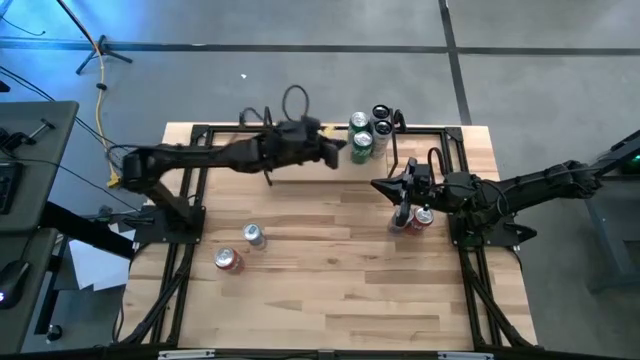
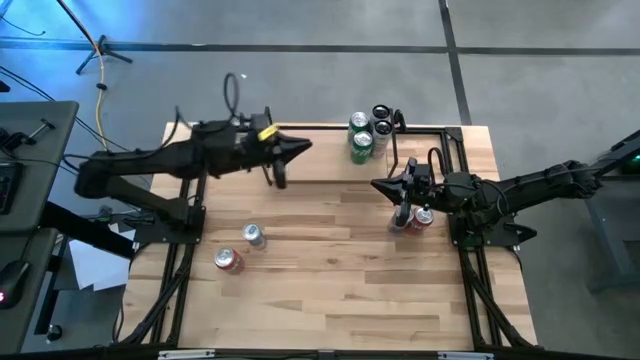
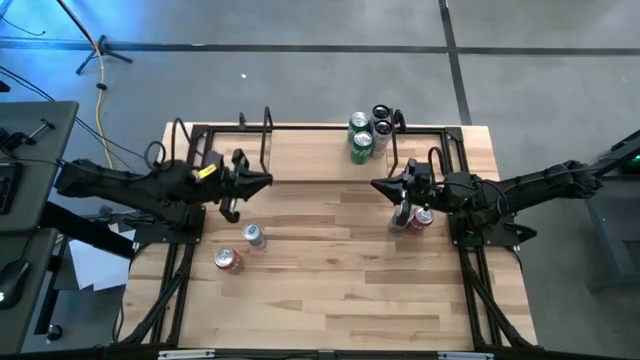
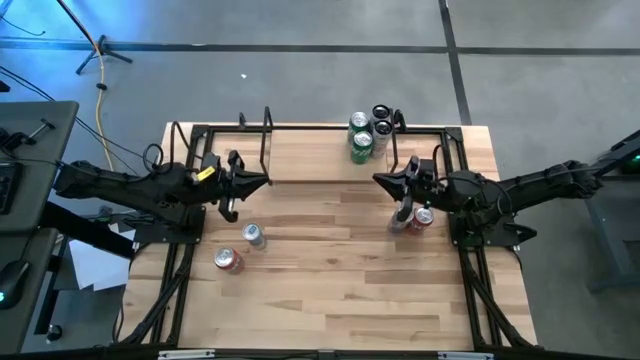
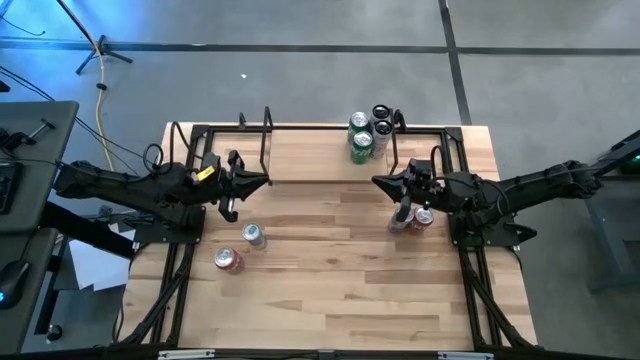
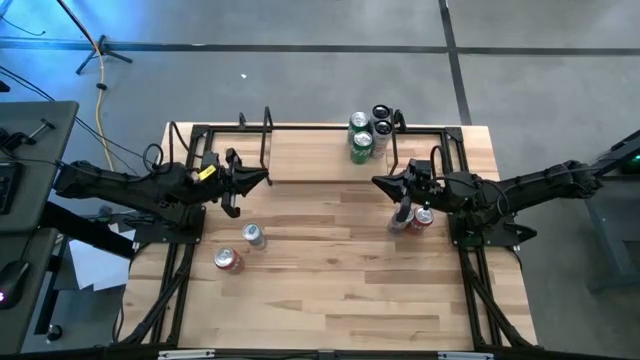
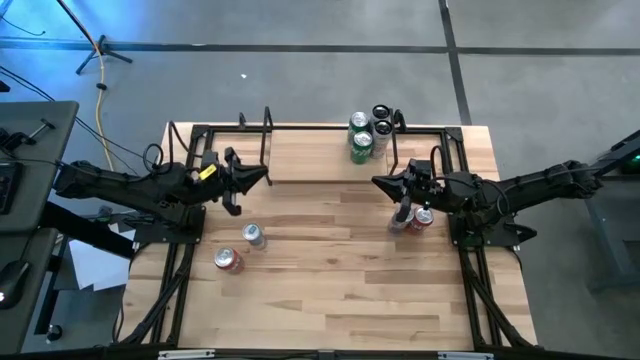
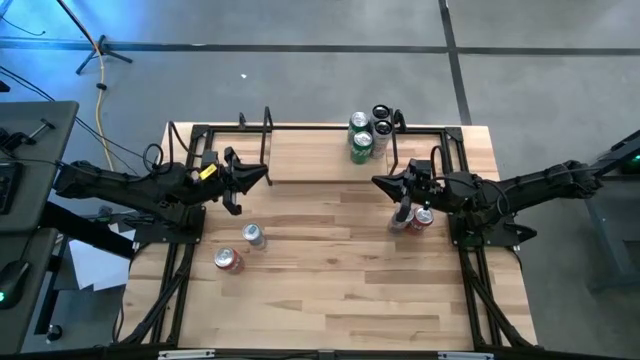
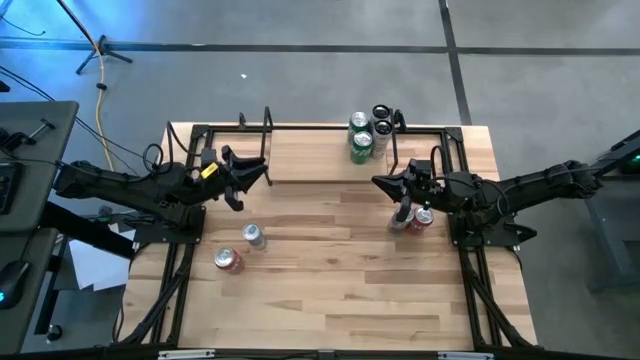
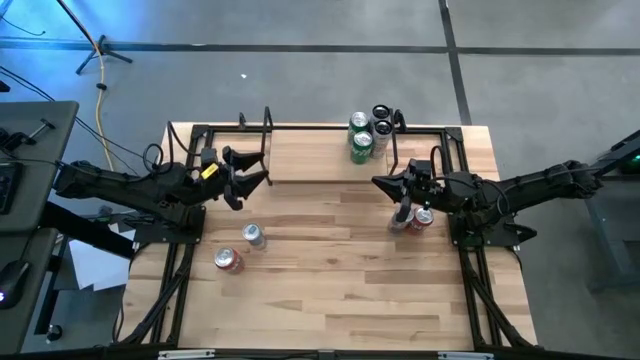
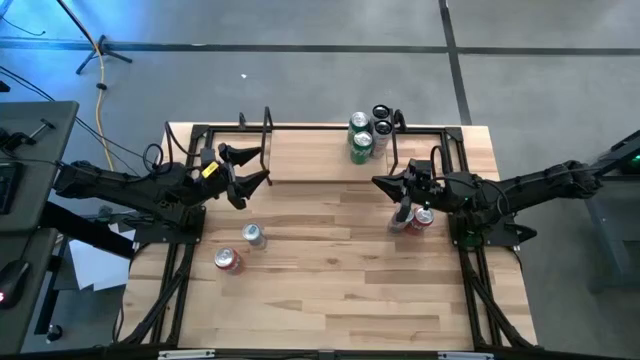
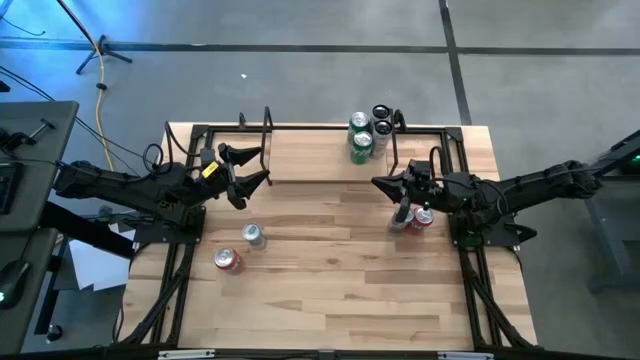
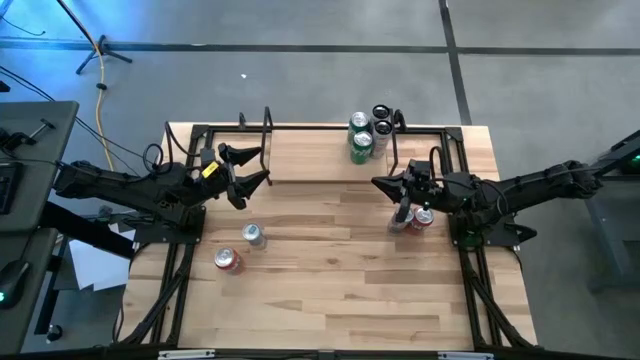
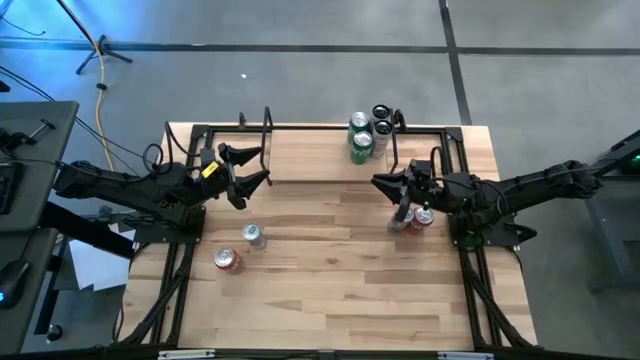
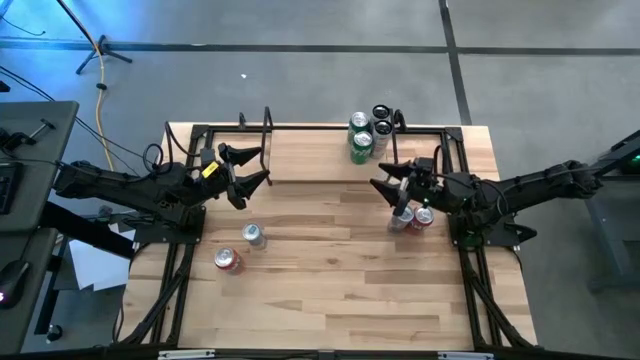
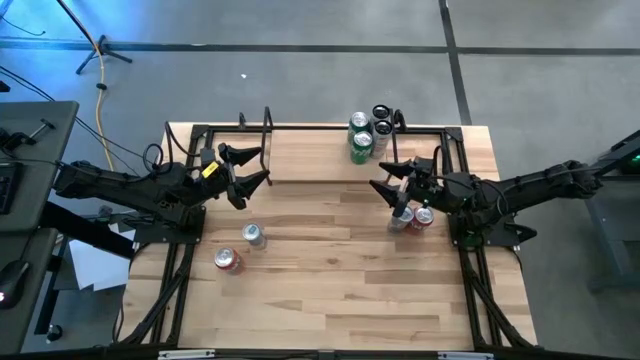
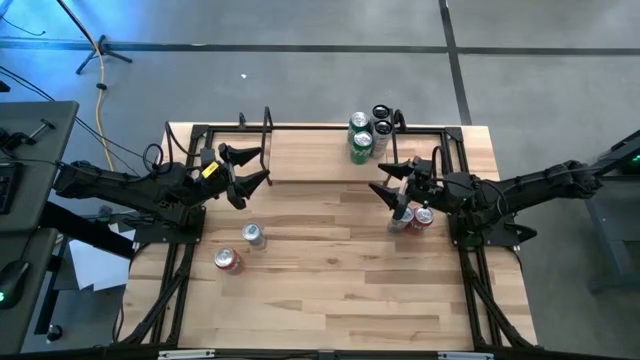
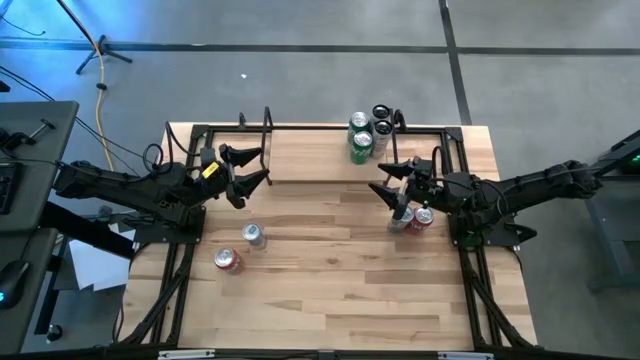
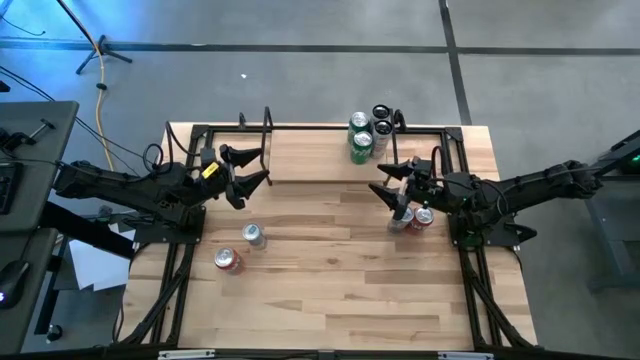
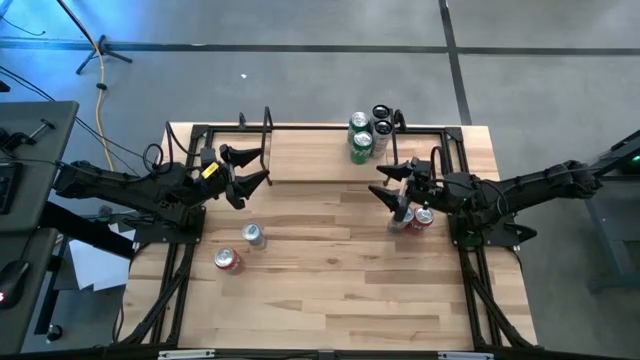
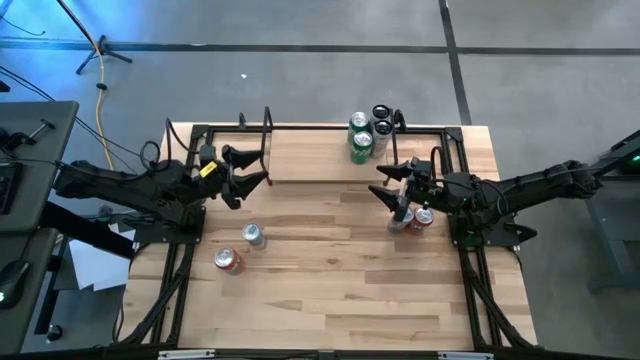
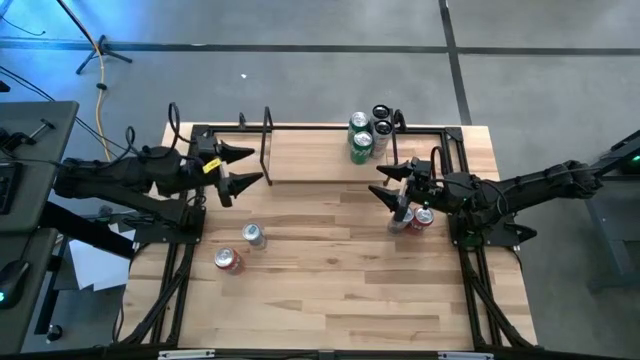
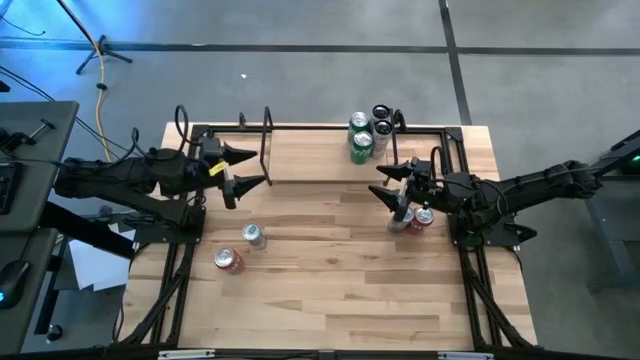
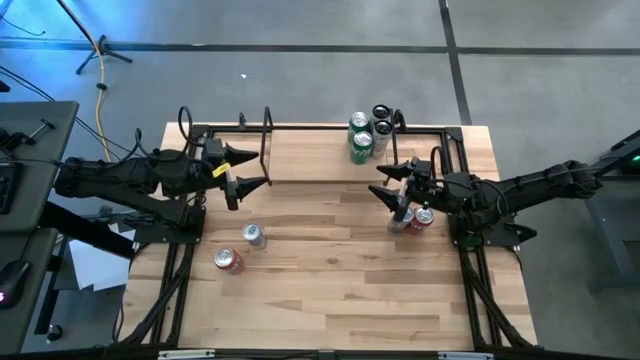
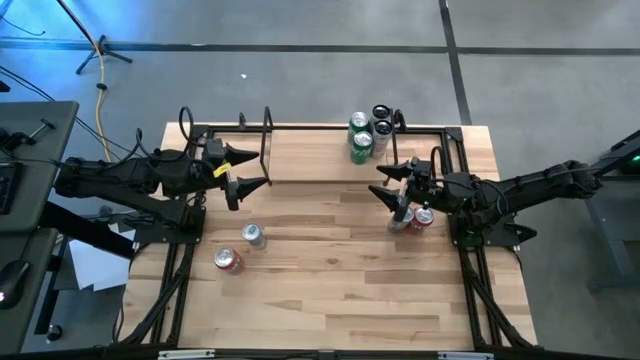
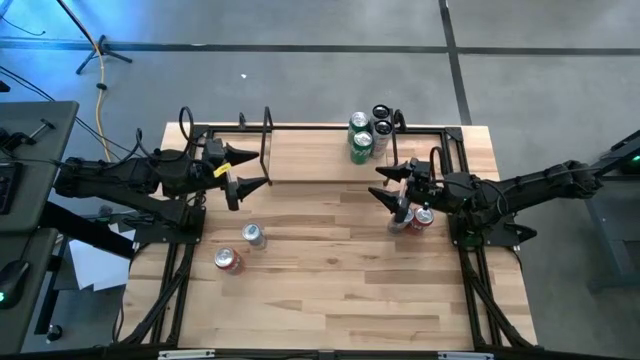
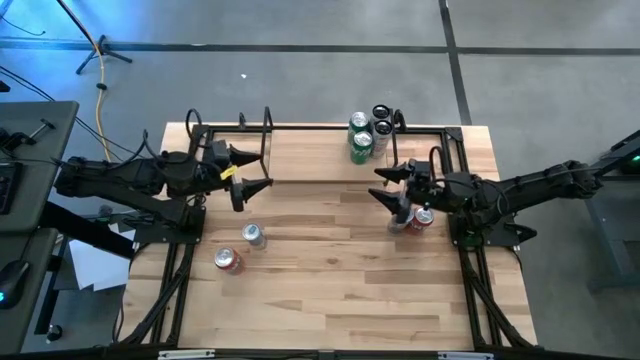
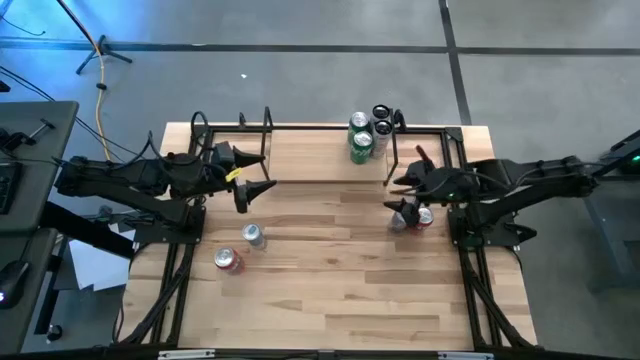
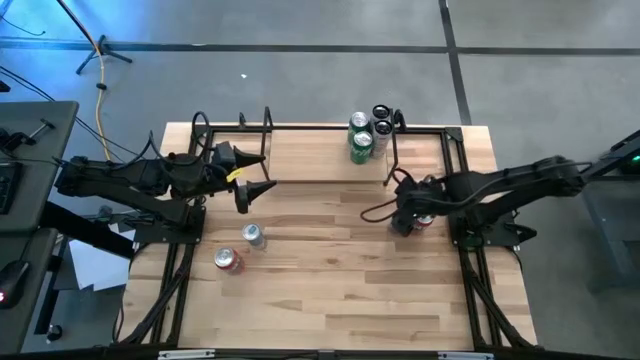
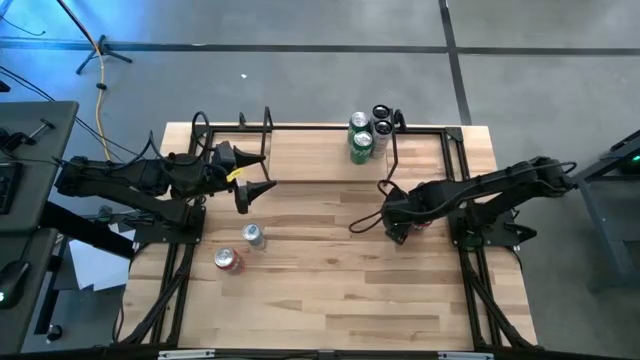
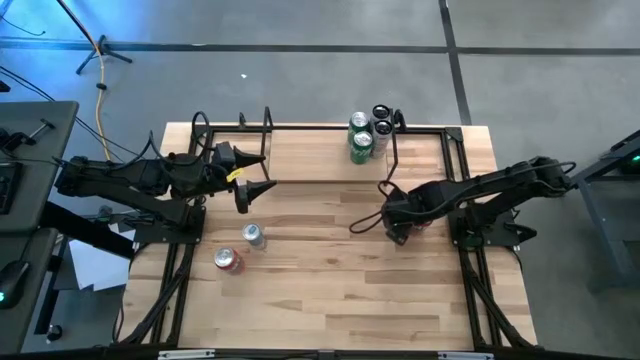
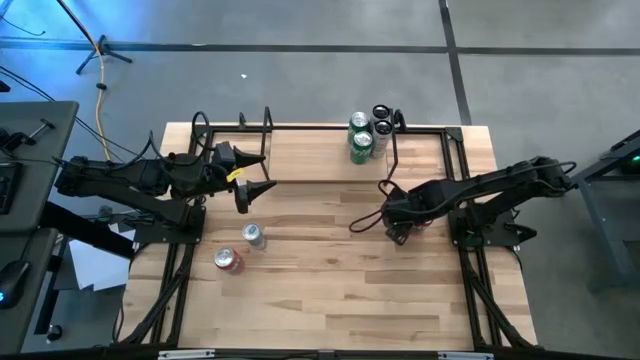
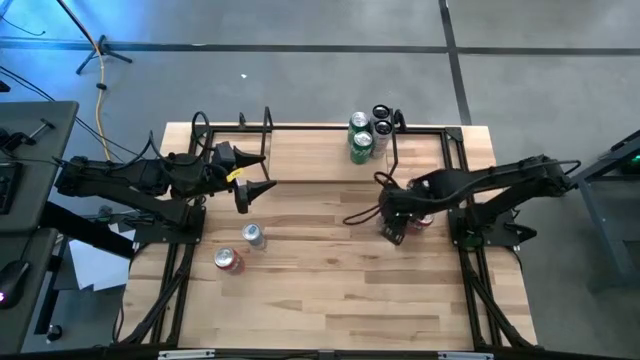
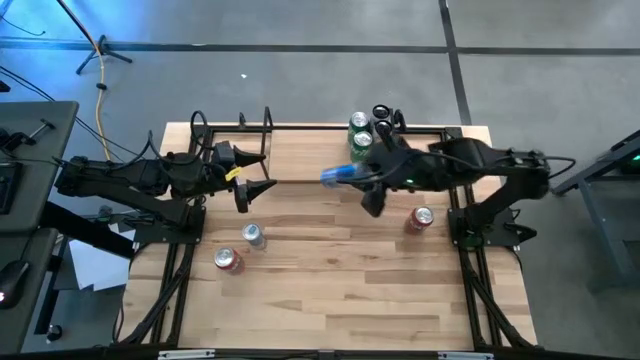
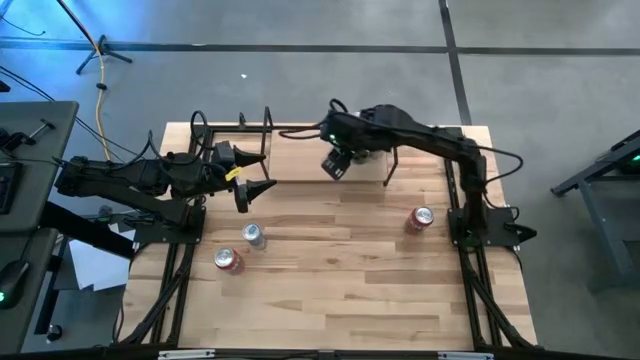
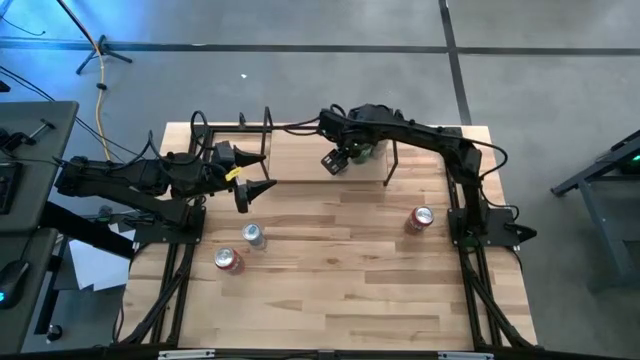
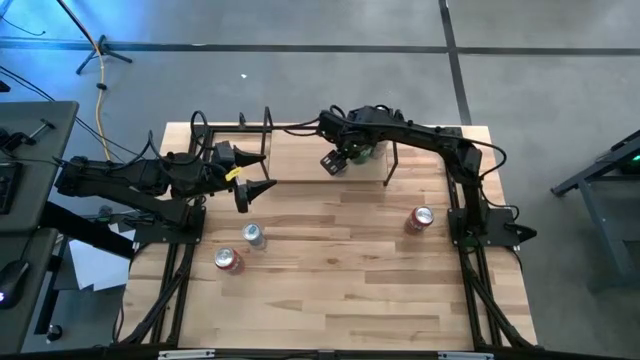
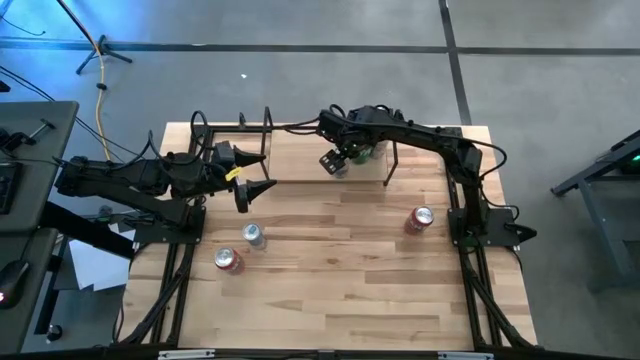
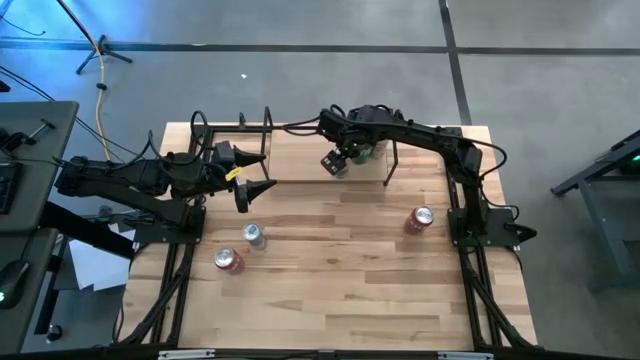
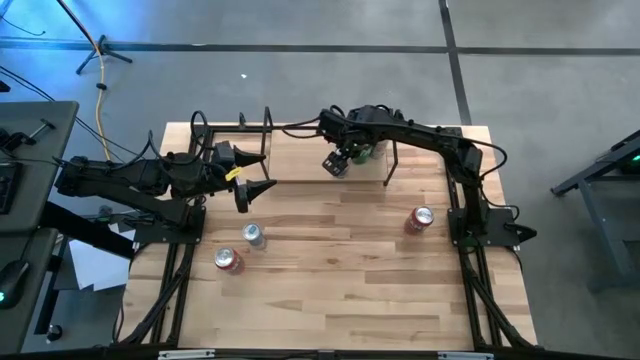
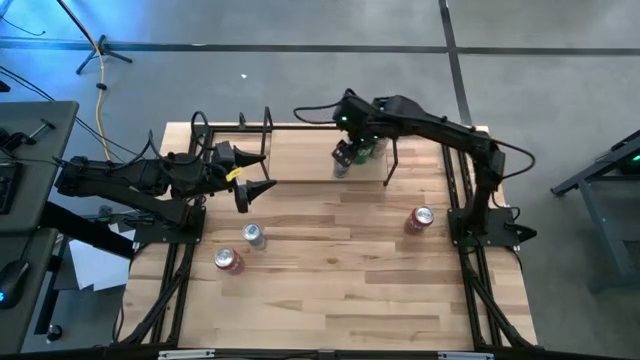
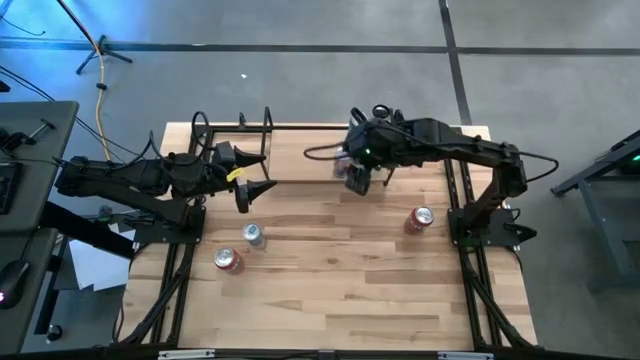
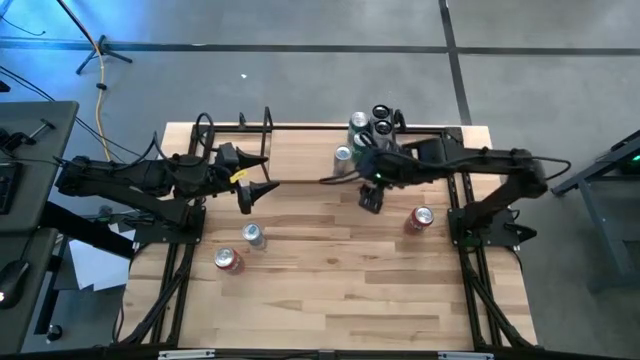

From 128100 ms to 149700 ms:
Task: Place canned beverage on shelf
Put the right blue soda can on the shelf
